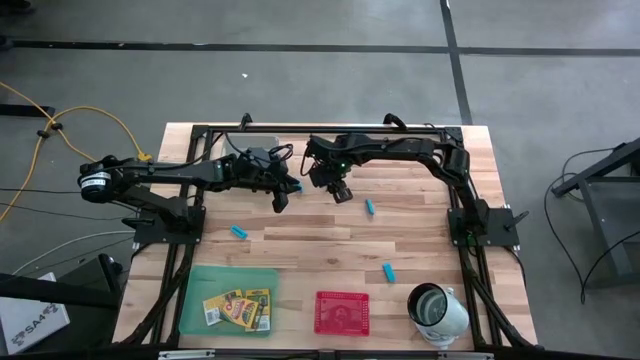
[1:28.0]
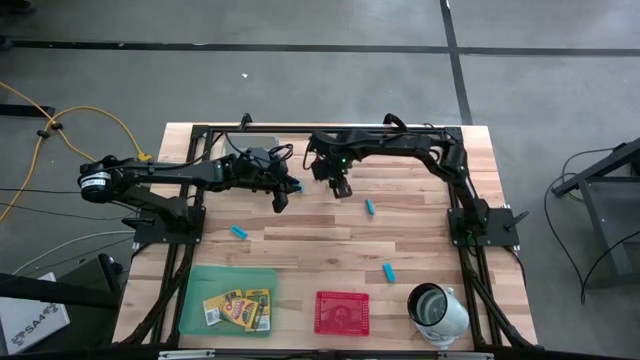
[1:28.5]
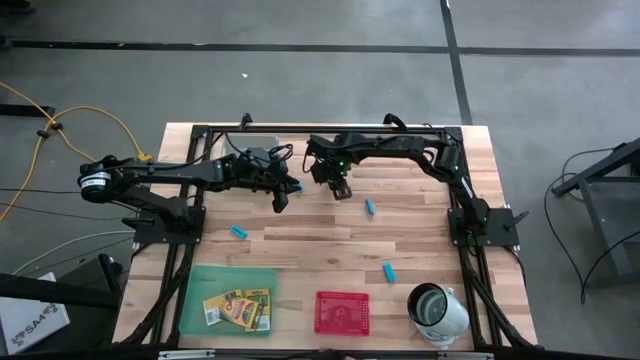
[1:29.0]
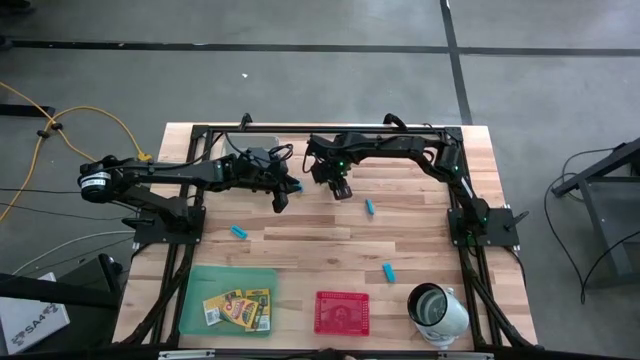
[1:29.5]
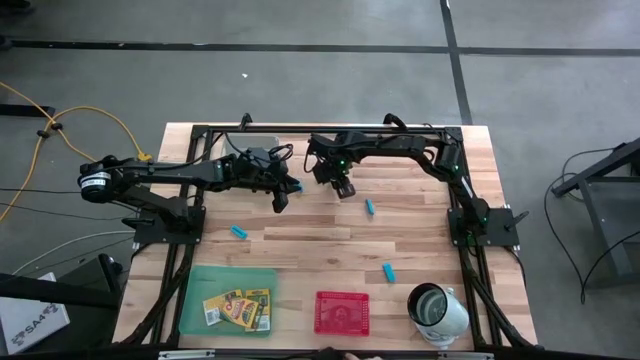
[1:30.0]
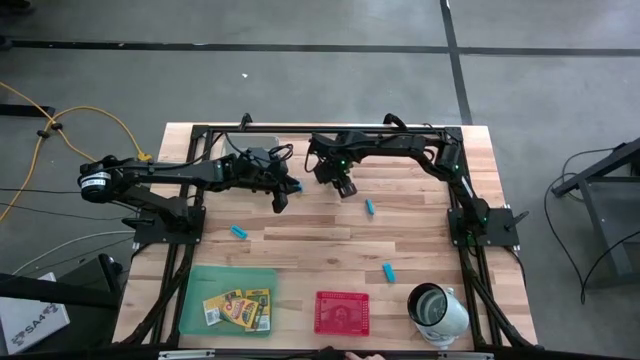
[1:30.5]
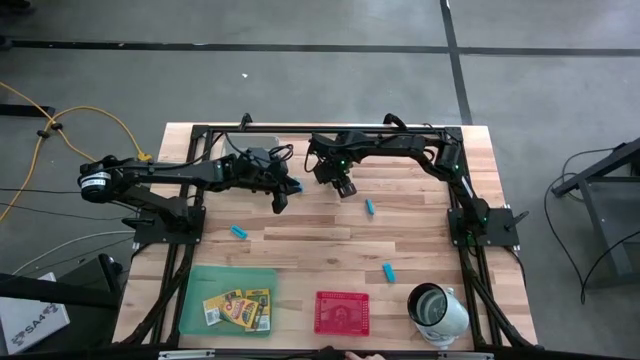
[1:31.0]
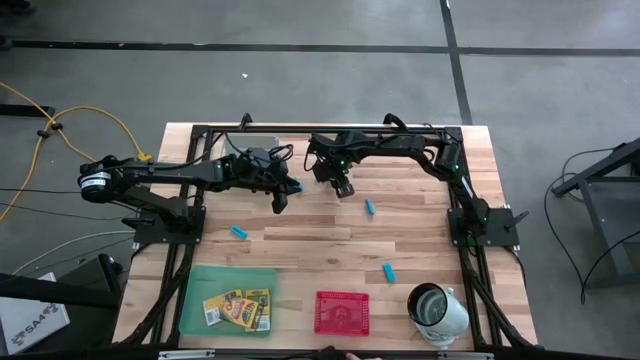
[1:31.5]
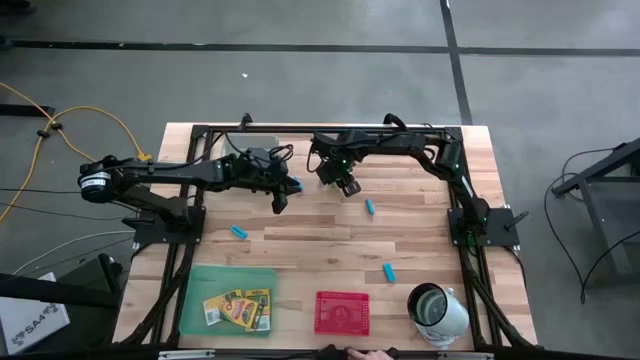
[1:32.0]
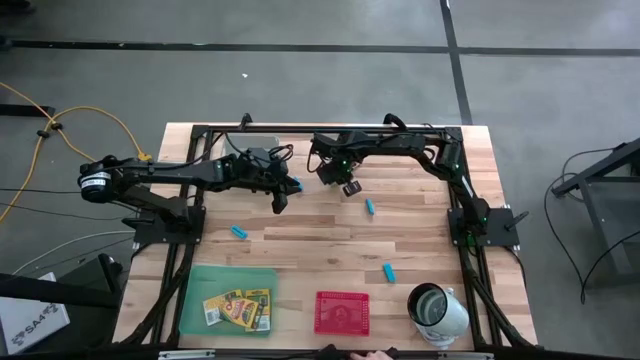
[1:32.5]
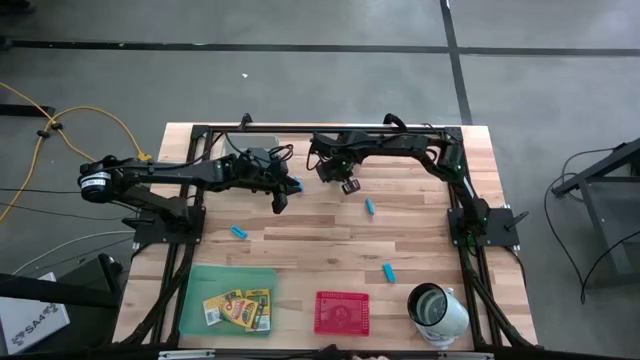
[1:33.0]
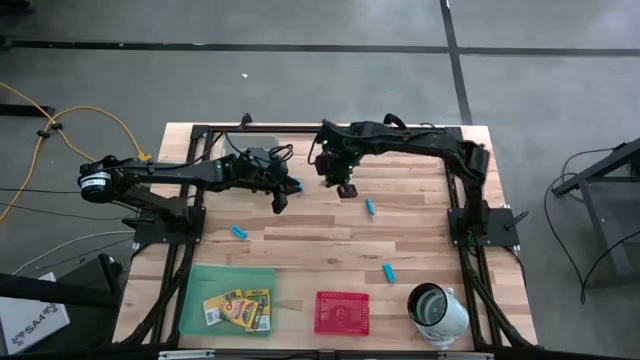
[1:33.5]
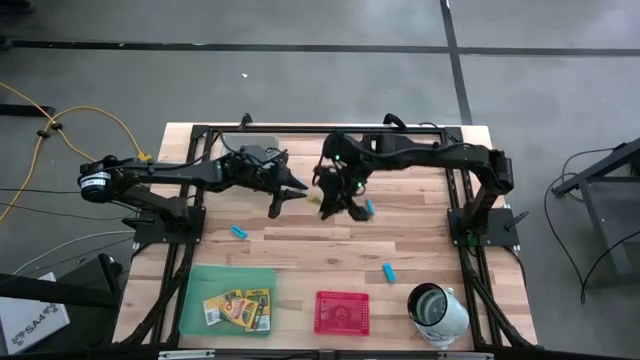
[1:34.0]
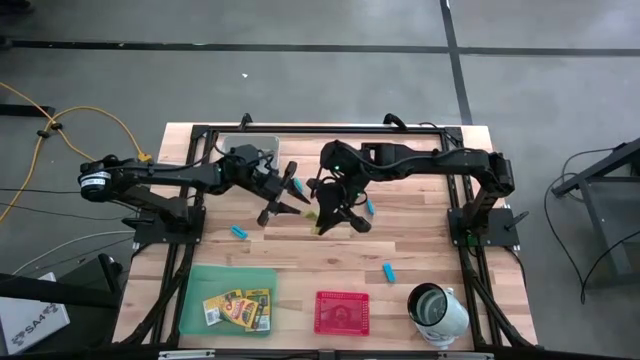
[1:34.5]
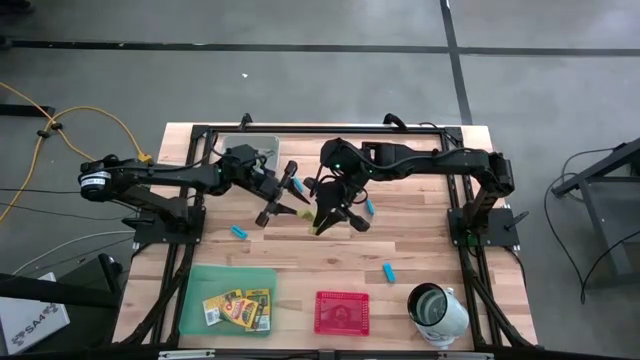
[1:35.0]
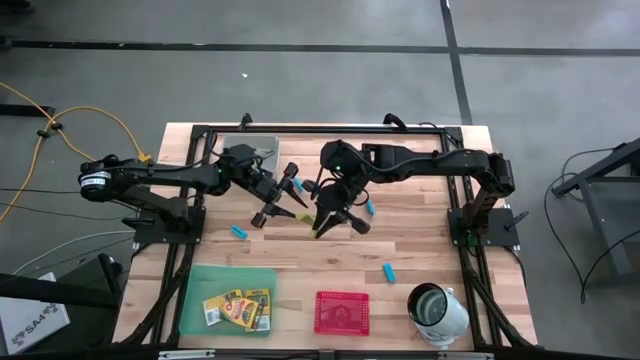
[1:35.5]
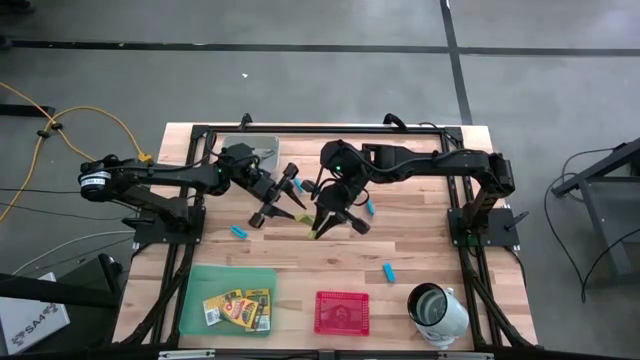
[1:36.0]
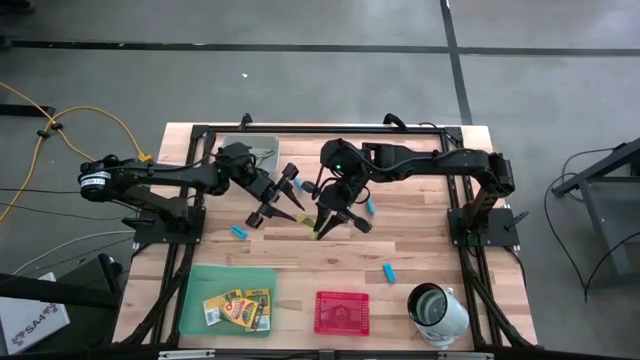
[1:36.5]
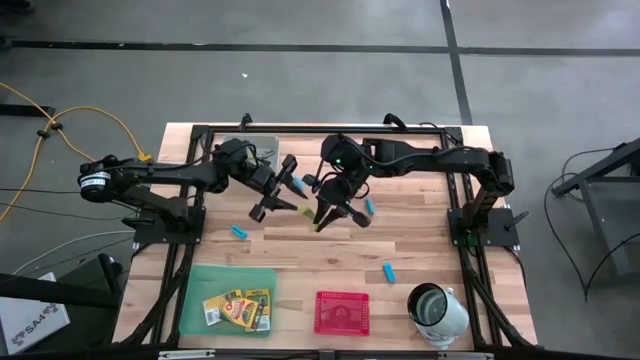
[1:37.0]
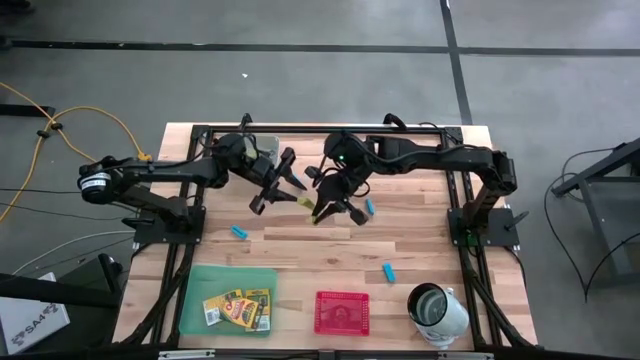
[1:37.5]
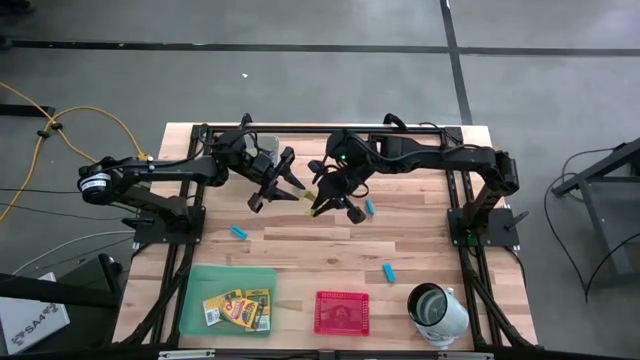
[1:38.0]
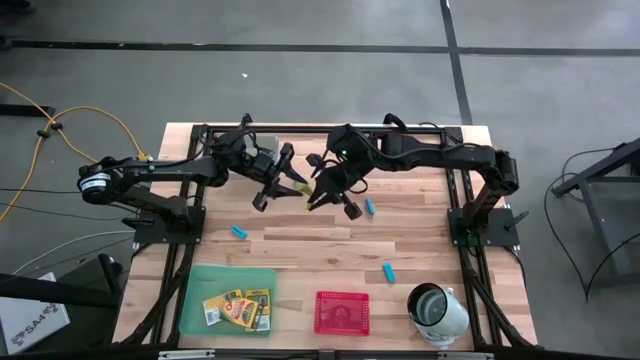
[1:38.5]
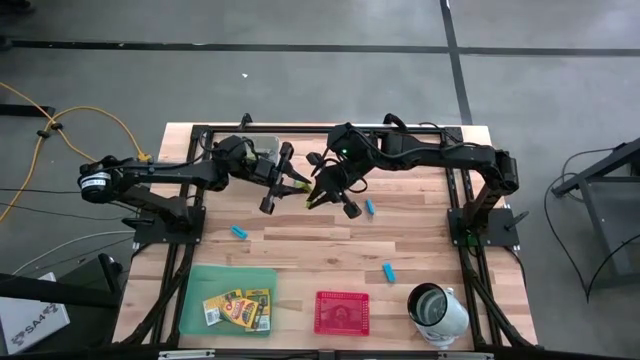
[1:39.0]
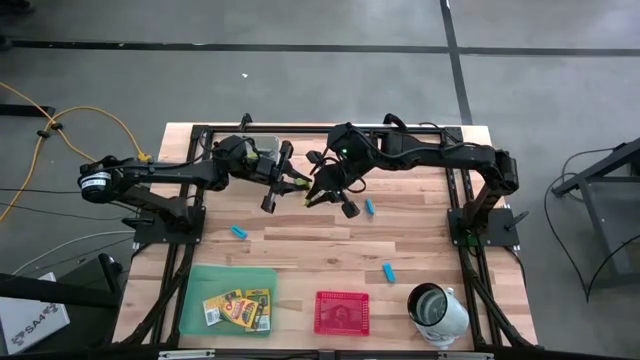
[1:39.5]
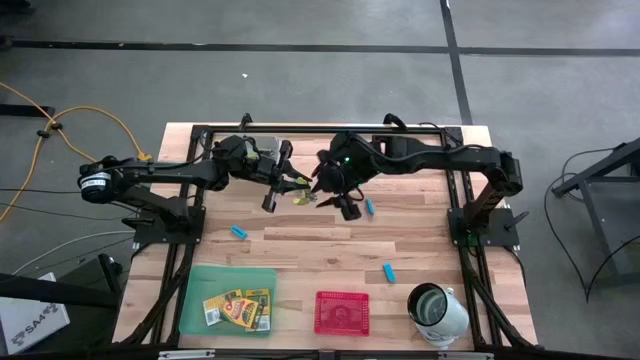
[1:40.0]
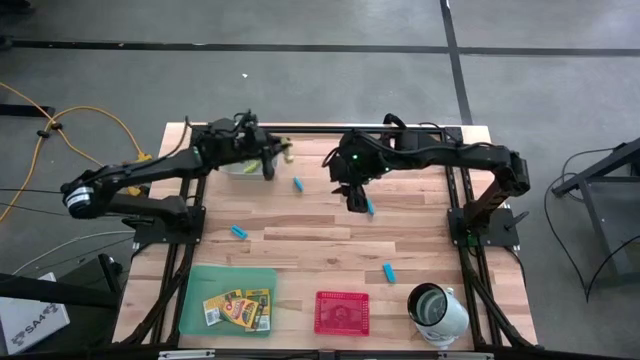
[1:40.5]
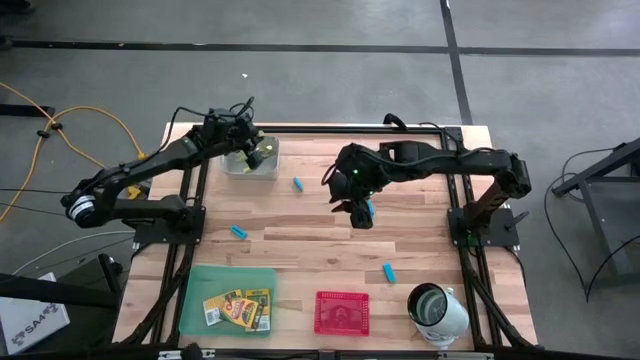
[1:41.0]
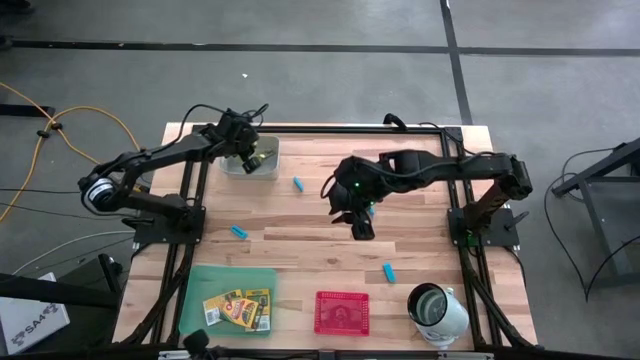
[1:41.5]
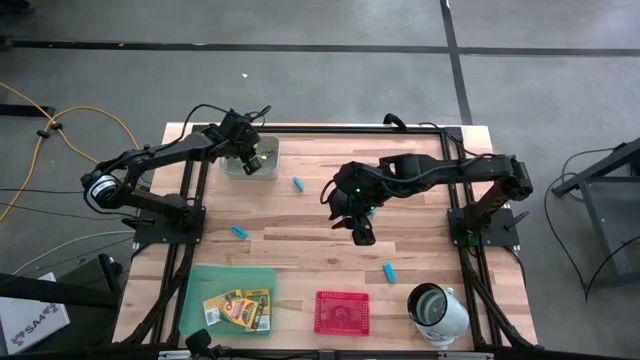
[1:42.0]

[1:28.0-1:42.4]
Task: Pick & Place School Supplies
Put the green hole puncher into the gray bin

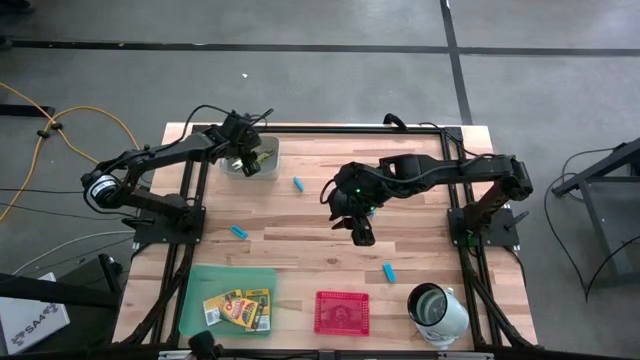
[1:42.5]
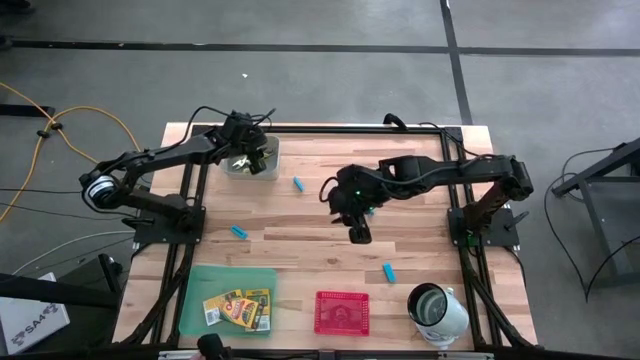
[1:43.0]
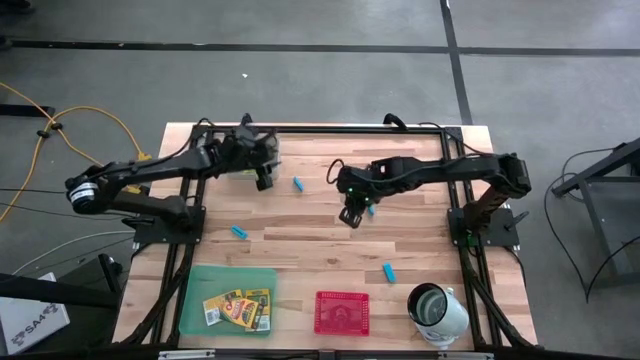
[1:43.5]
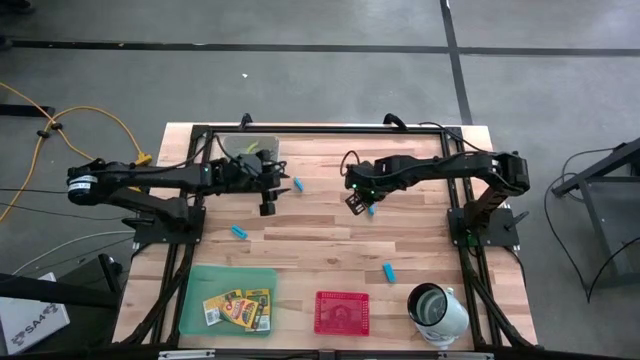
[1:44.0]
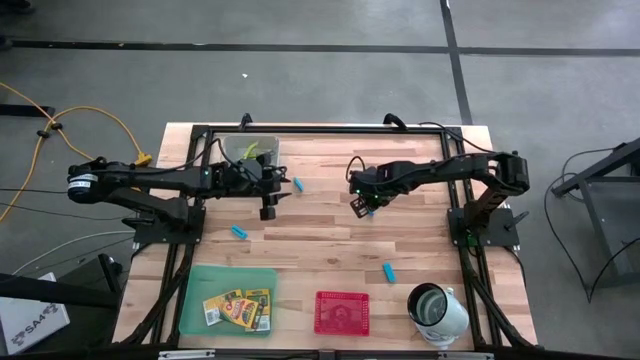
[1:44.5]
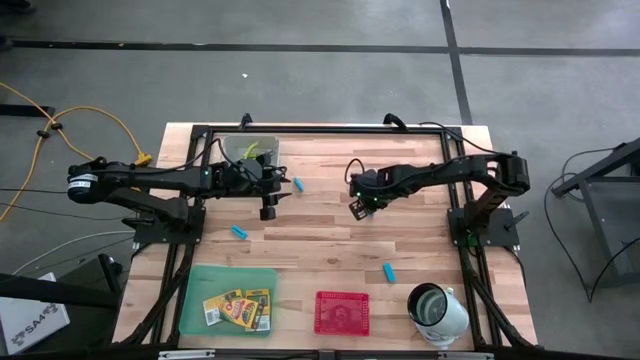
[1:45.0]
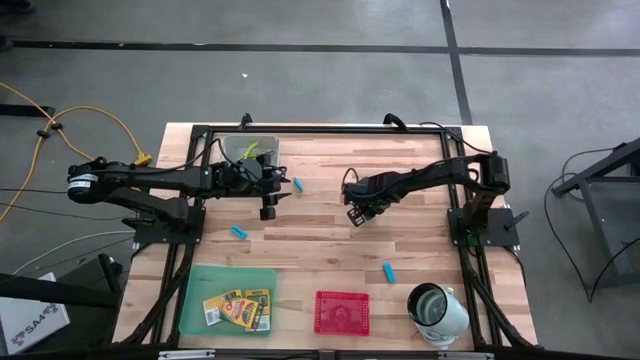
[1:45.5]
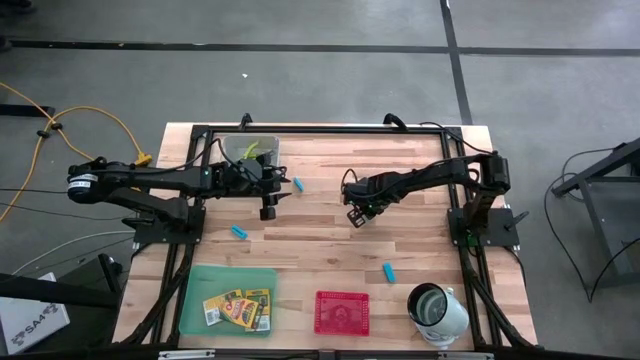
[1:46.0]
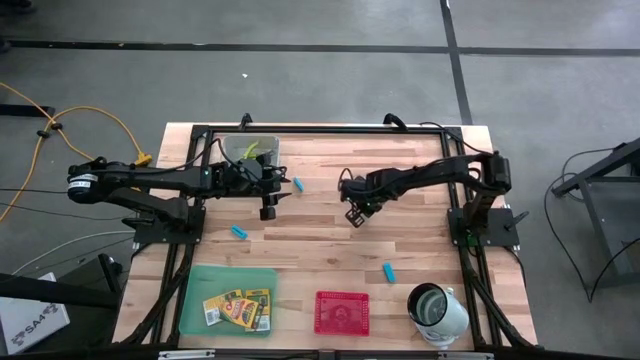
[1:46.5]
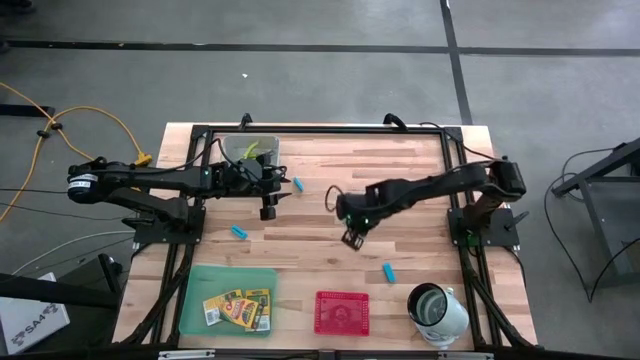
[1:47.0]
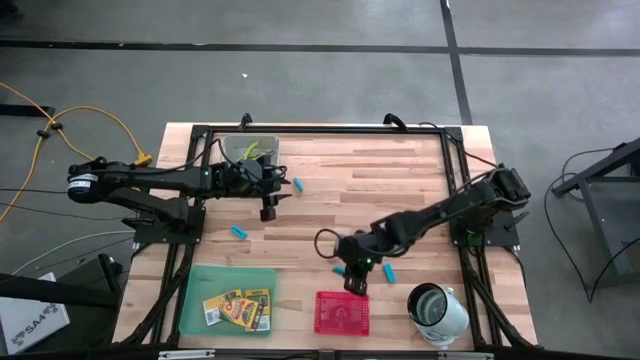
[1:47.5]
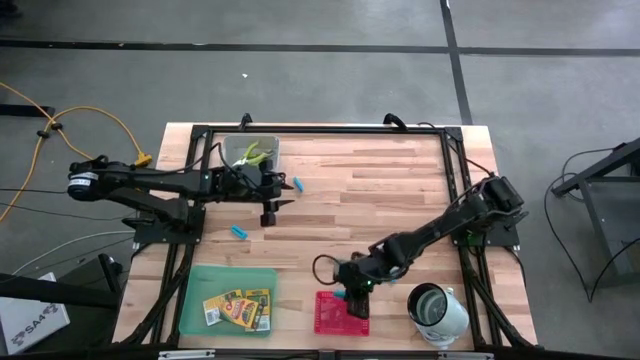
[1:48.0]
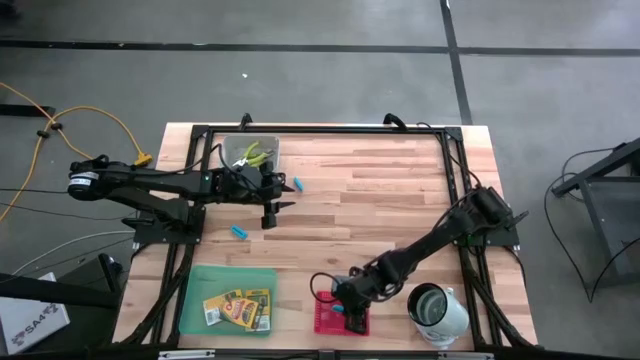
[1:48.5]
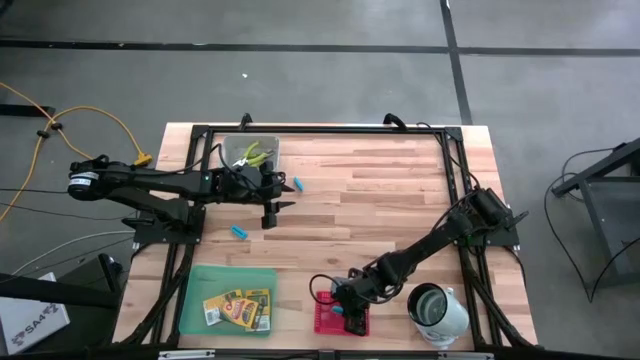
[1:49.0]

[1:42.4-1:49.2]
Put the blue eraser into the red bin
